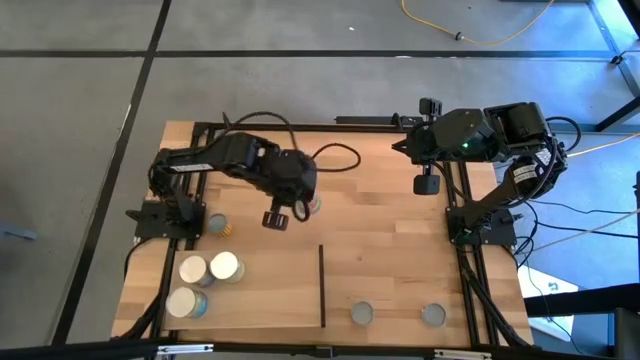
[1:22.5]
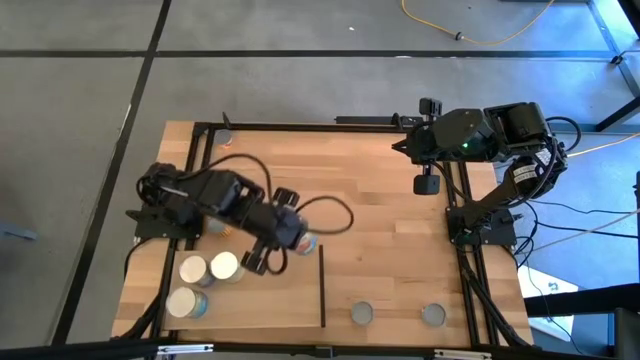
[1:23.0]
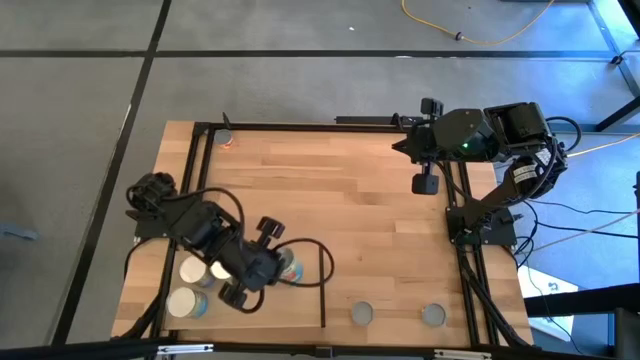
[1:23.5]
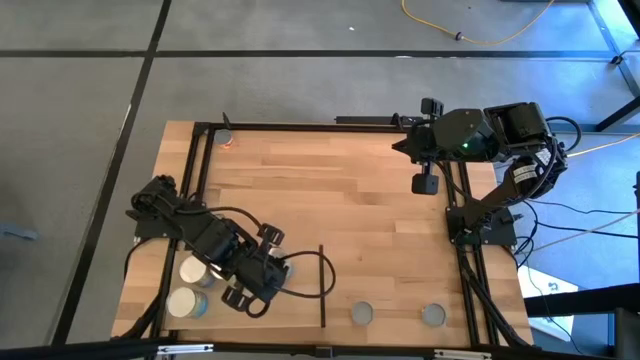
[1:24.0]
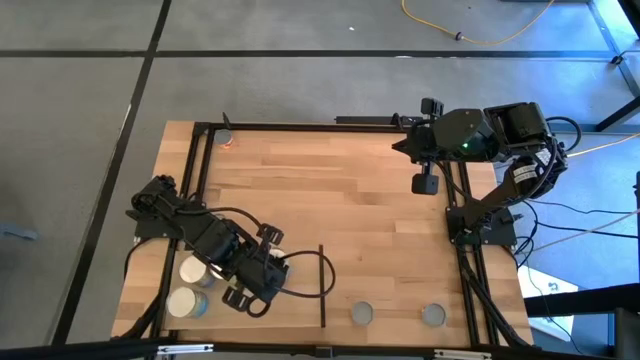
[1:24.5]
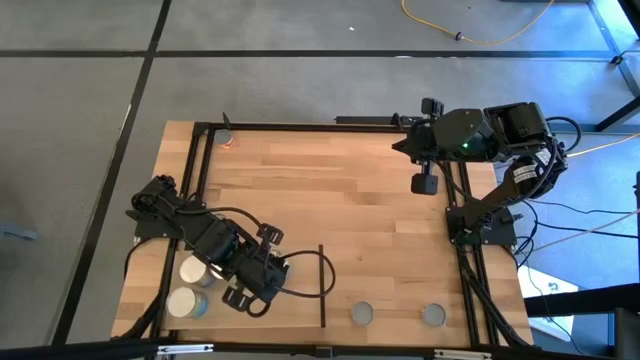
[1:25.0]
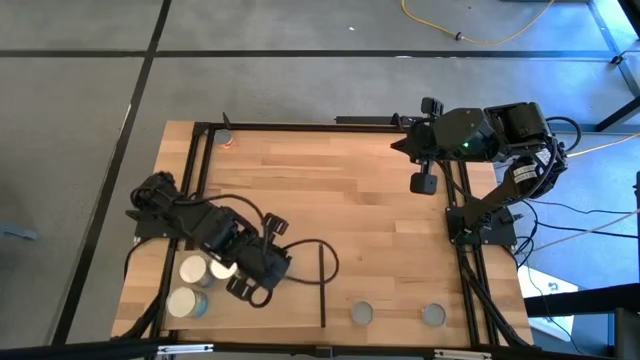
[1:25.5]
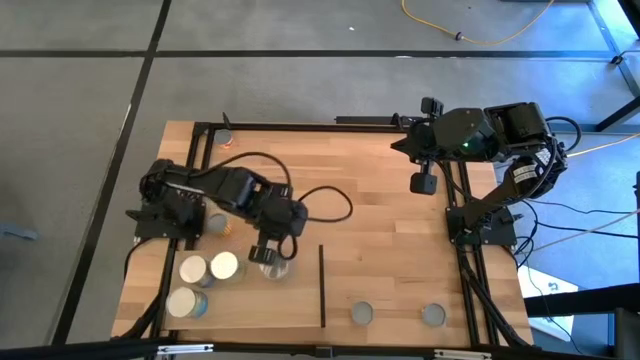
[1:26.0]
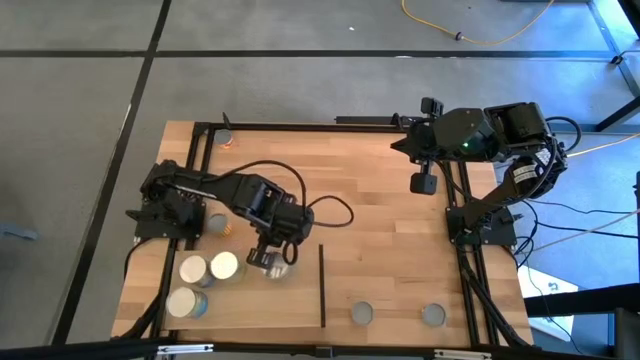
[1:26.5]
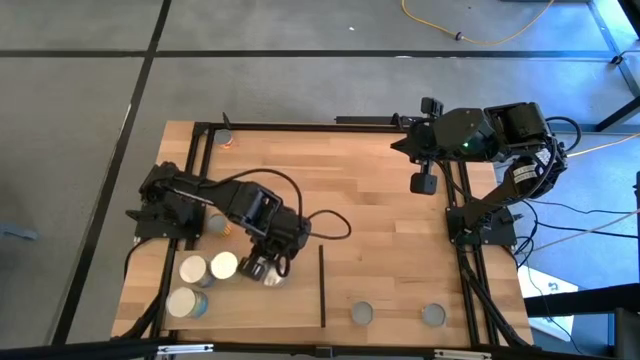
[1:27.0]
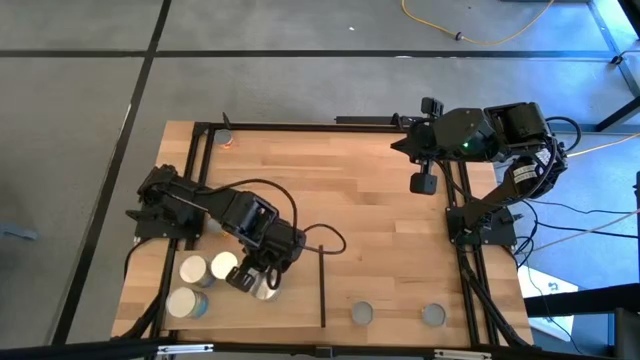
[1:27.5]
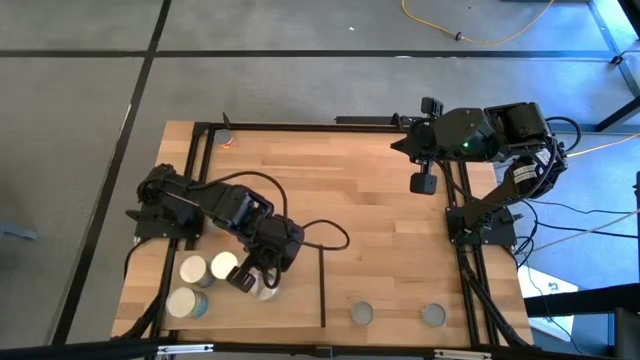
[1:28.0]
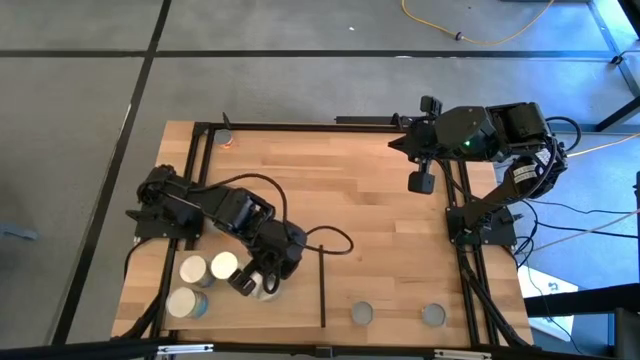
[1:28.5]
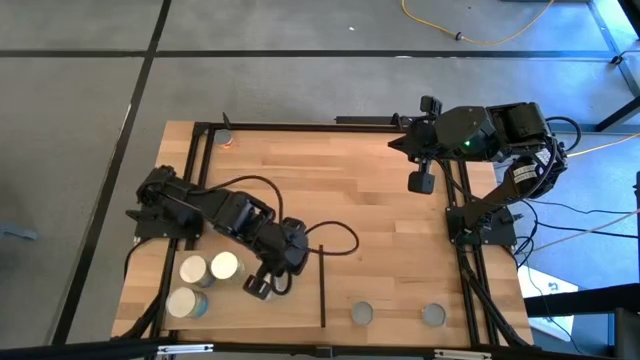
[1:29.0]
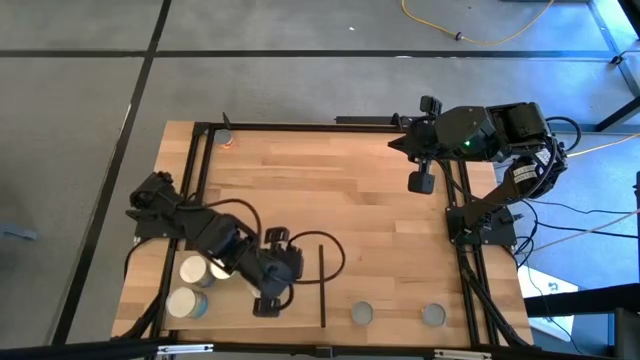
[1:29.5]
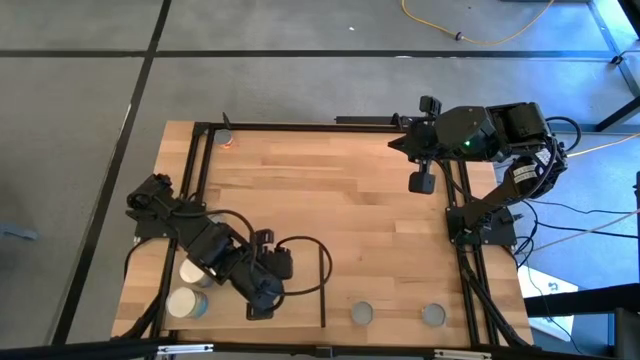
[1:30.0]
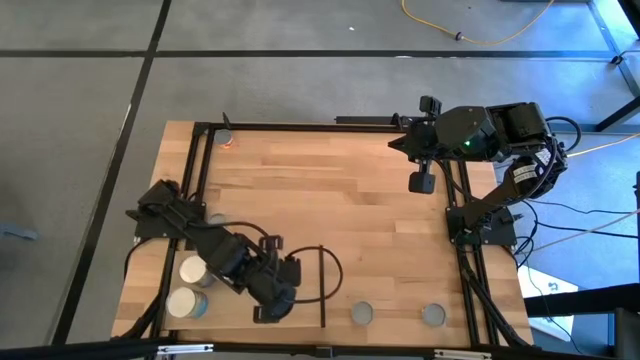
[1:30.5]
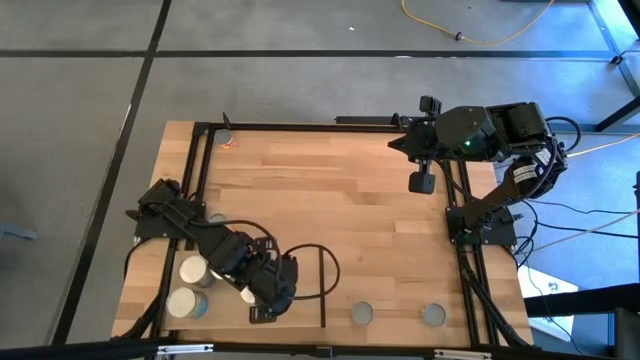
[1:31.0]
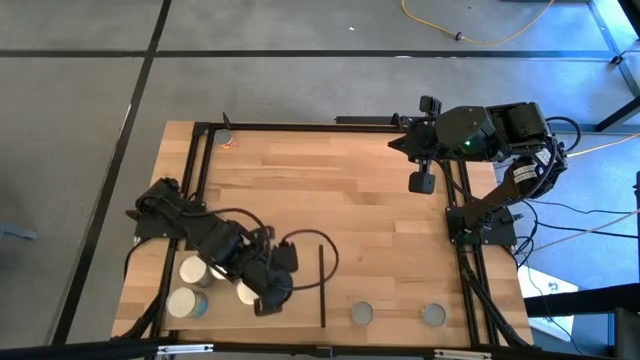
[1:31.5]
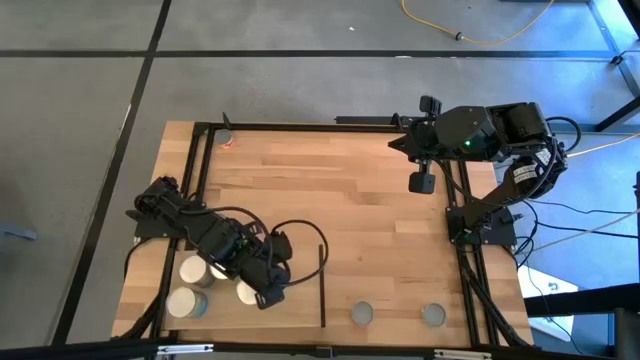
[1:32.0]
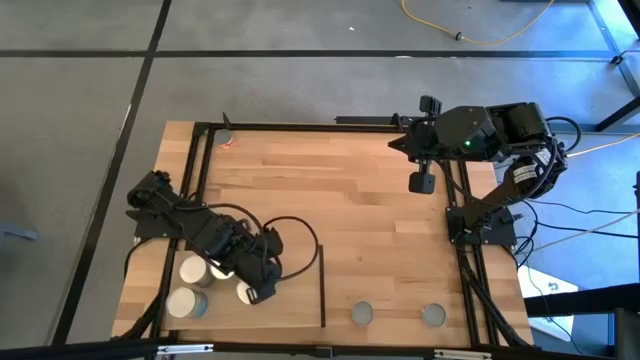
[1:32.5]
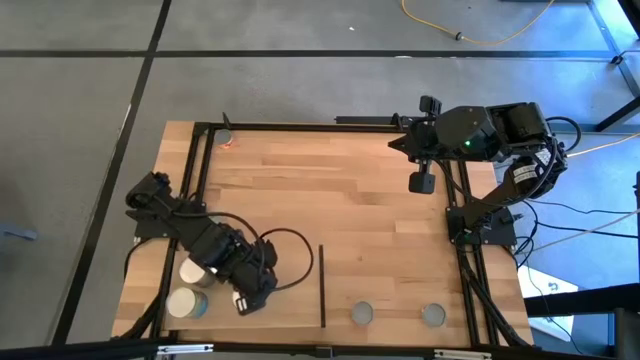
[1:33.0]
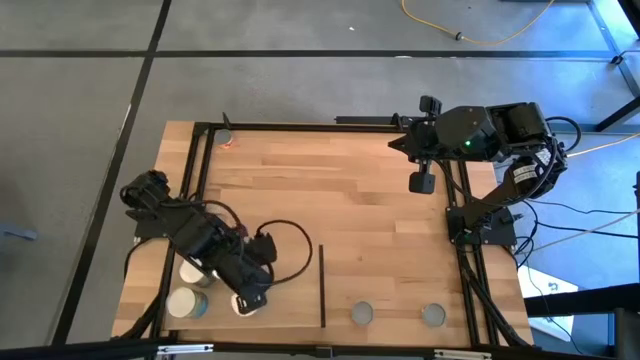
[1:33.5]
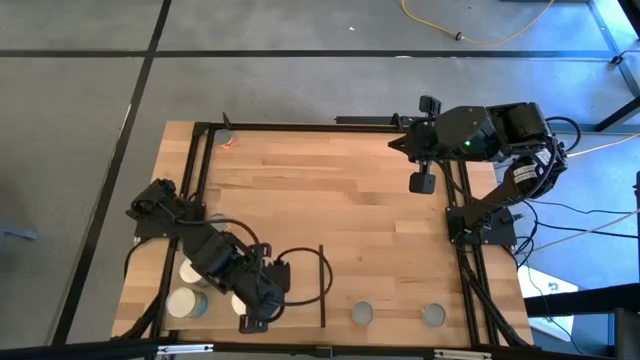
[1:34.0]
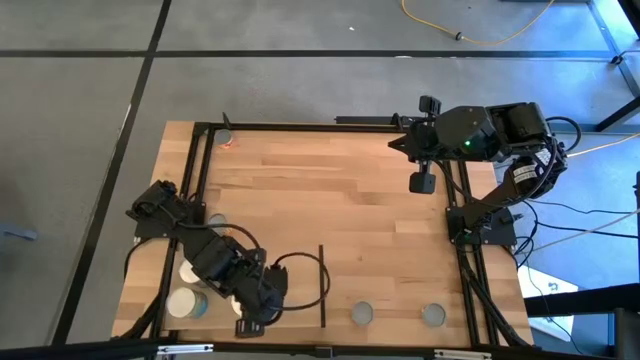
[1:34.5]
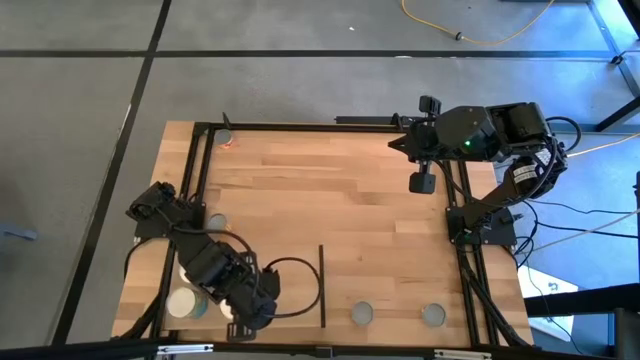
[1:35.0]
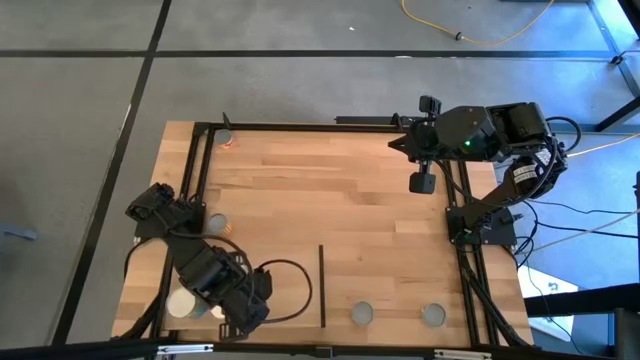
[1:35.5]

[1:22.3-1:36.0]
Task: Pick and place cans onto a shelf
Put the canned tomato on the shelf

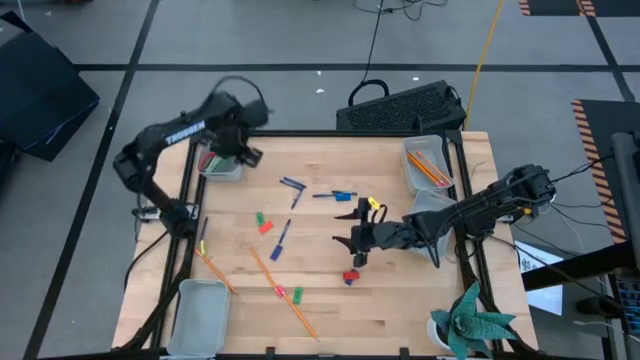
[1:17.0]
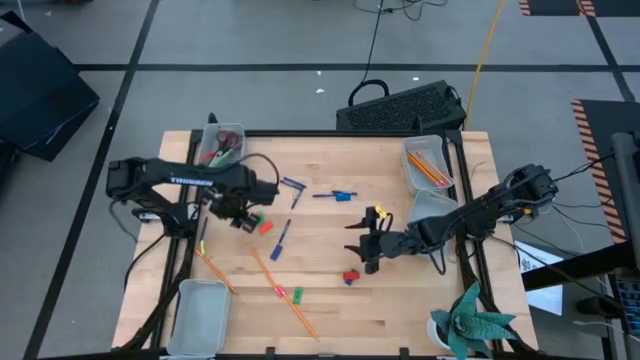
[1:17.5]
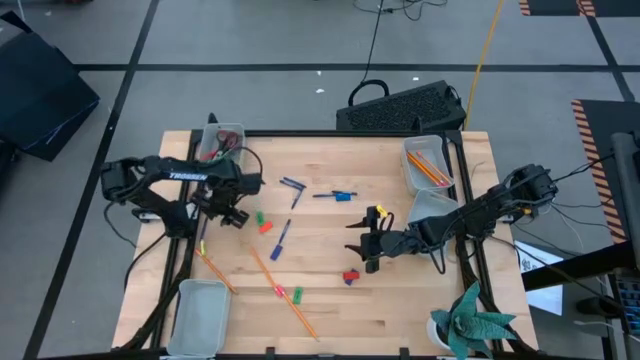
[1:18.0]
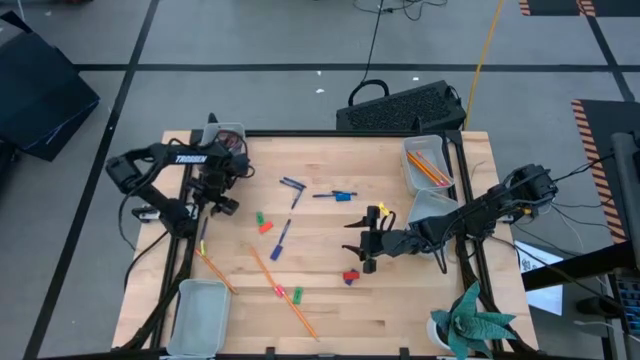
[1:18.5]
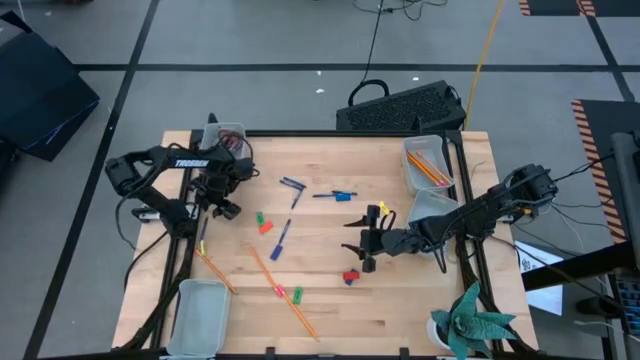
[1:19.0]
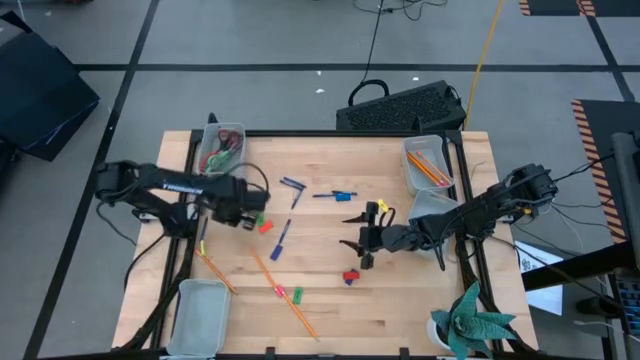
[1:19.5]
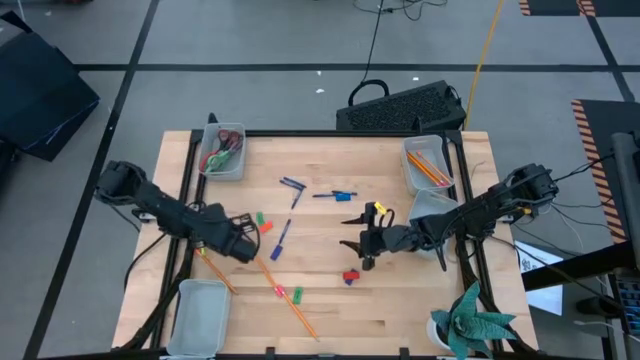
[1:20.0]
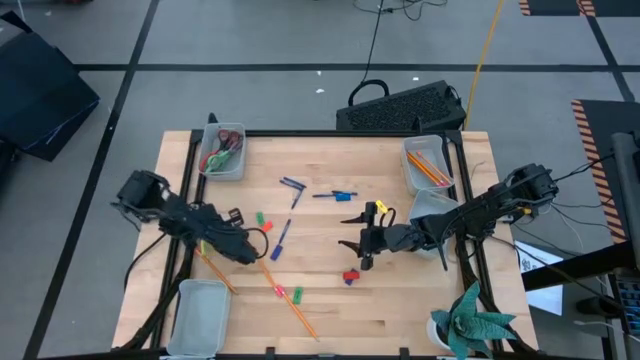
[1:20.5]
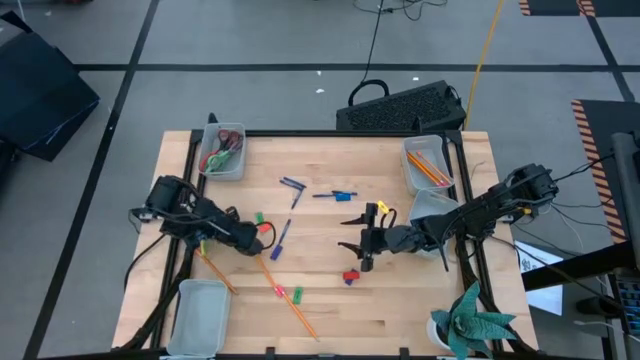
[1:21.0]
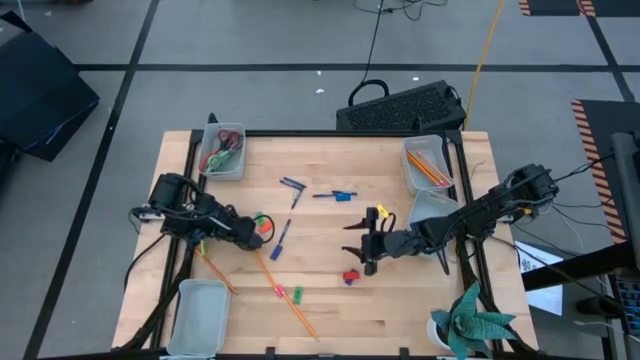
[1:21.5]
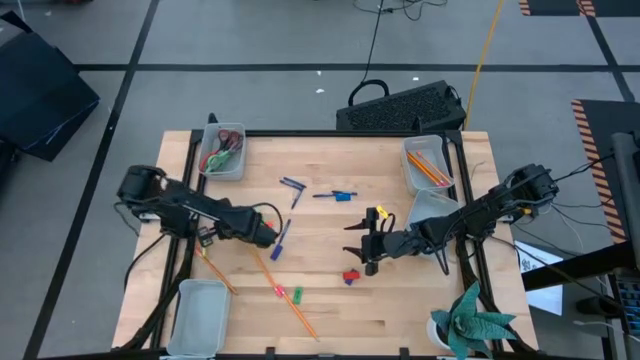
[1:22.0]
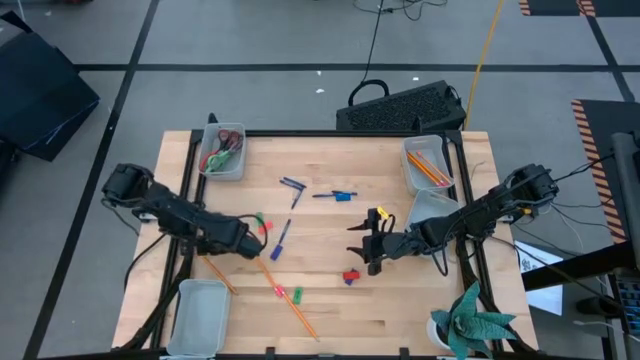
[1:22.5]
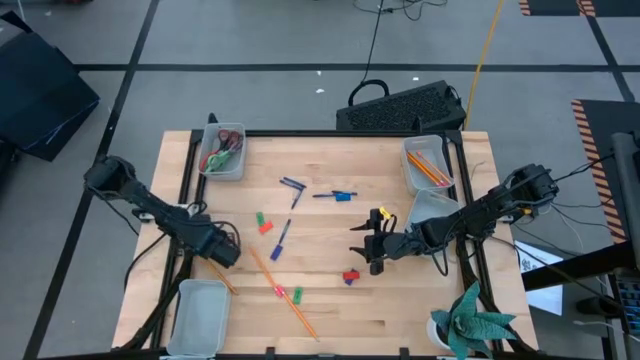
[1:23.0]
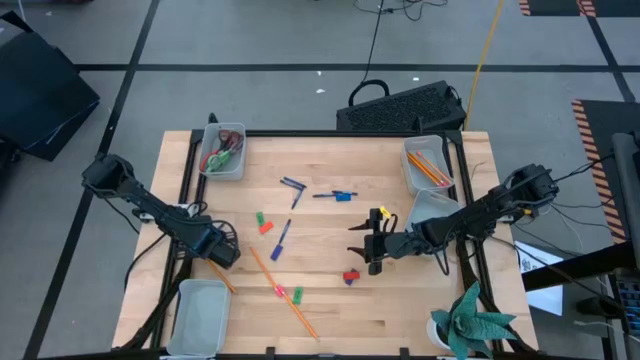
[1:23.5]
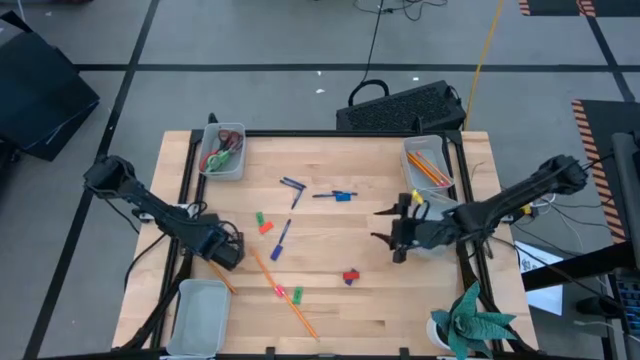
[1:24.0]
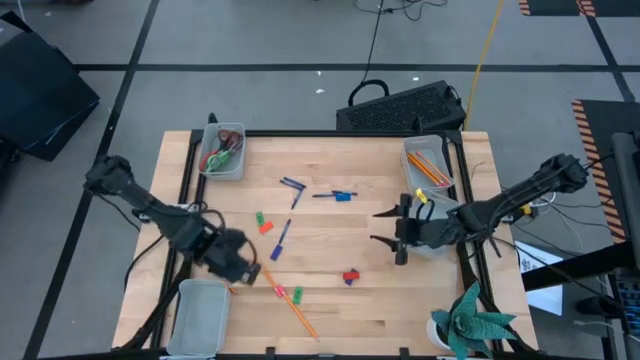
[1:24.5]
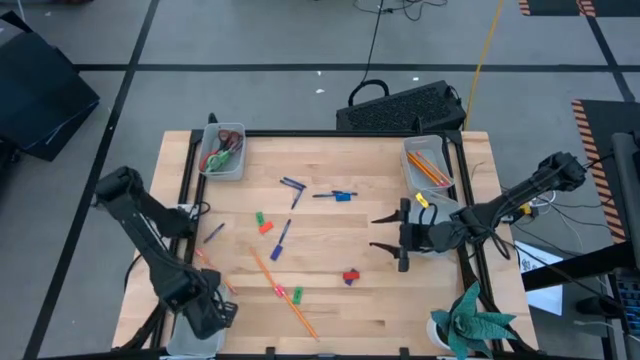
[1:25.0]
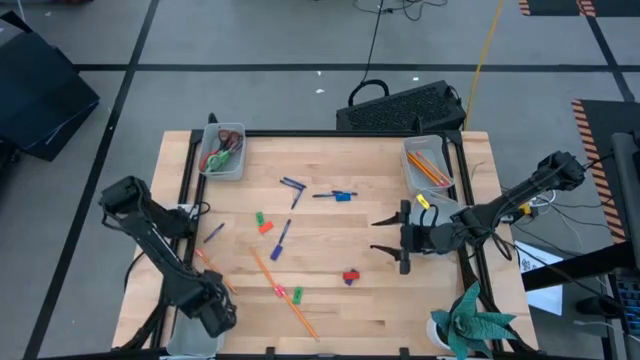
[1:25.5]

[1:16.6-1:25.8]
Task: Sort crayons/erasers/pens/pencils in bins
Put the light green eraser into the bottom left gray bin
